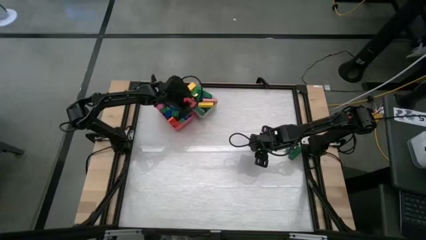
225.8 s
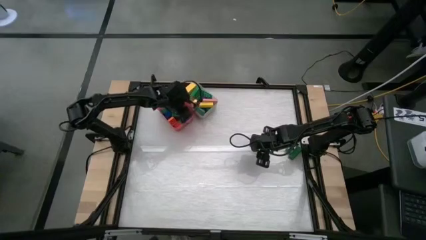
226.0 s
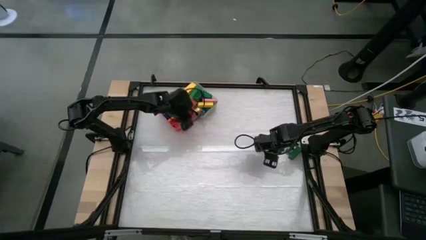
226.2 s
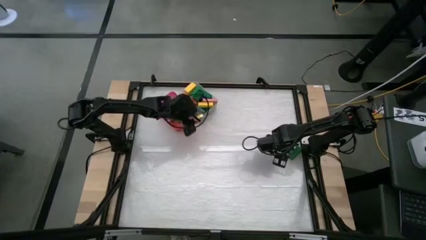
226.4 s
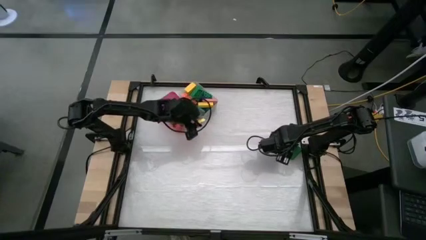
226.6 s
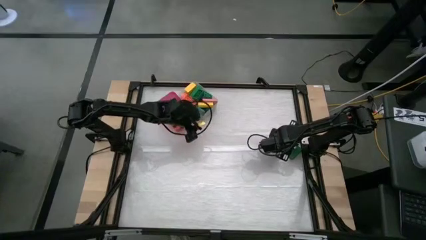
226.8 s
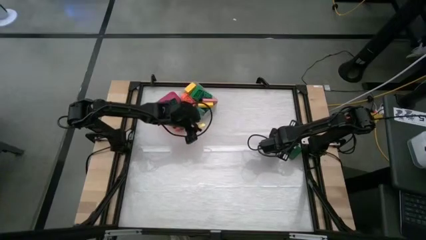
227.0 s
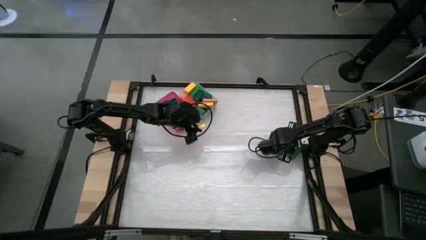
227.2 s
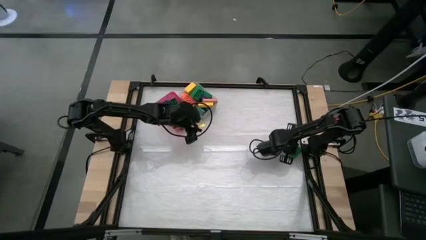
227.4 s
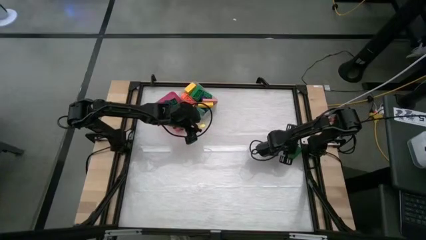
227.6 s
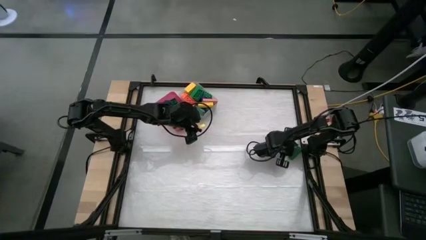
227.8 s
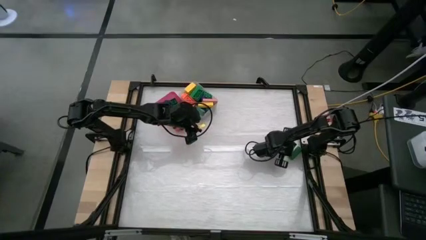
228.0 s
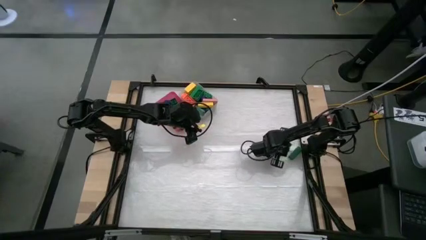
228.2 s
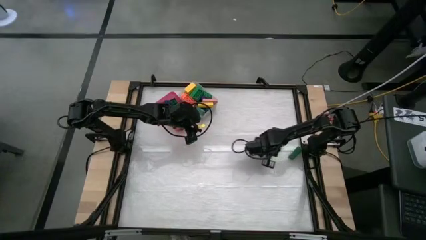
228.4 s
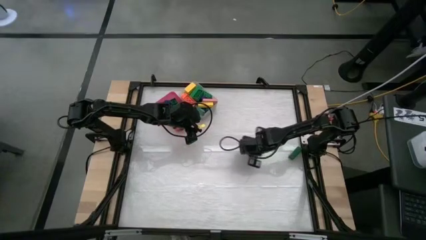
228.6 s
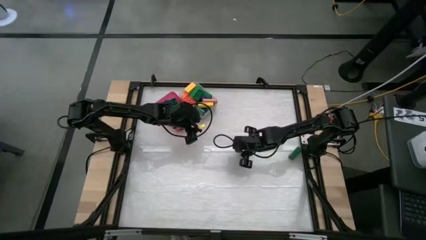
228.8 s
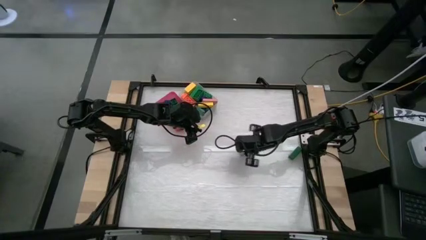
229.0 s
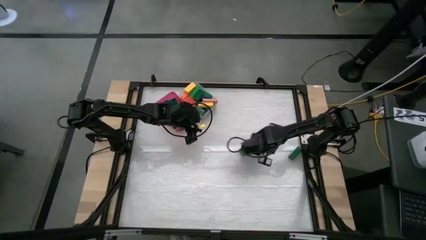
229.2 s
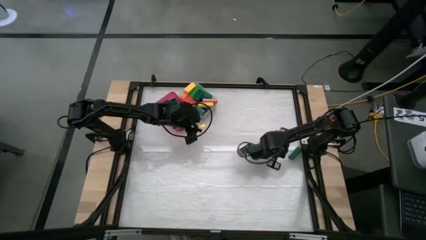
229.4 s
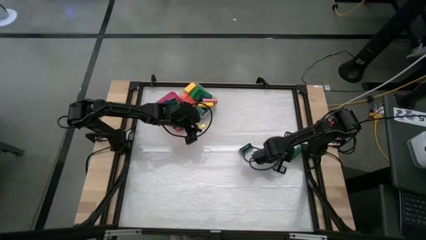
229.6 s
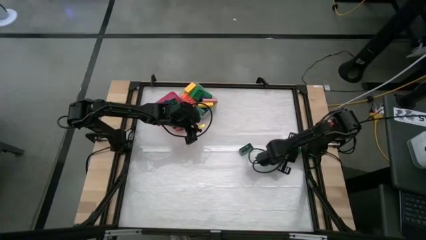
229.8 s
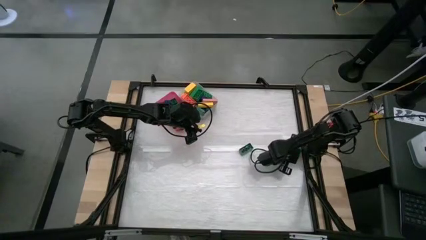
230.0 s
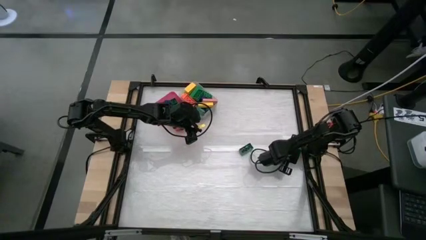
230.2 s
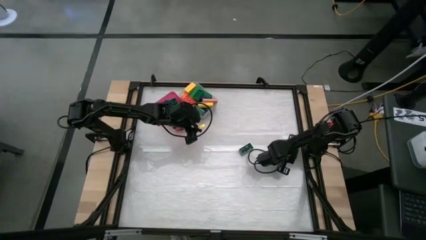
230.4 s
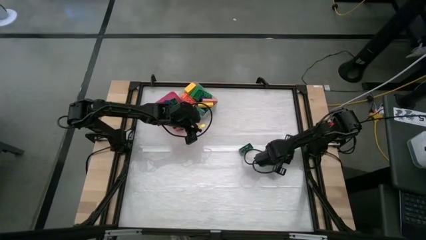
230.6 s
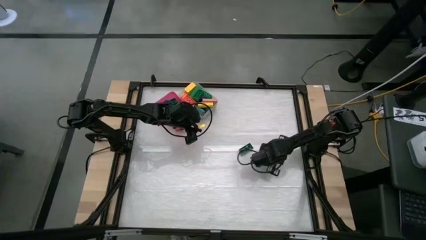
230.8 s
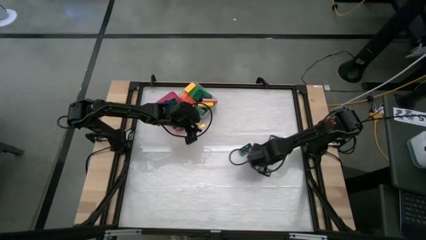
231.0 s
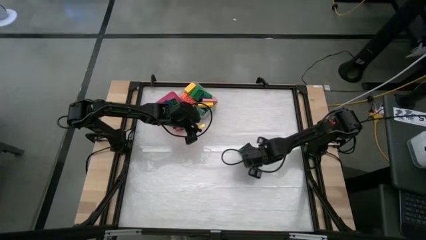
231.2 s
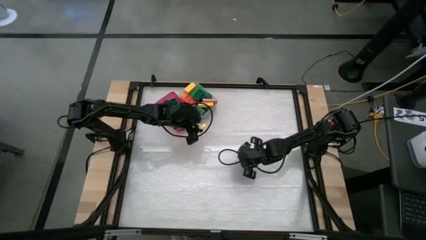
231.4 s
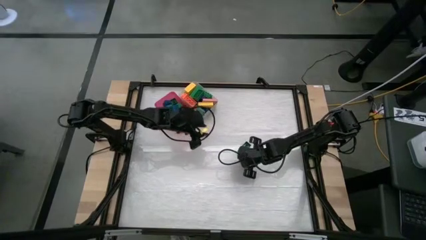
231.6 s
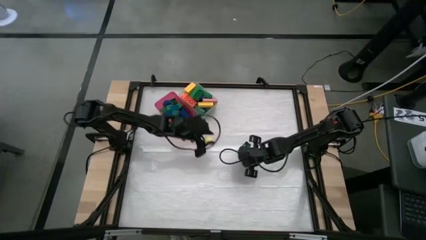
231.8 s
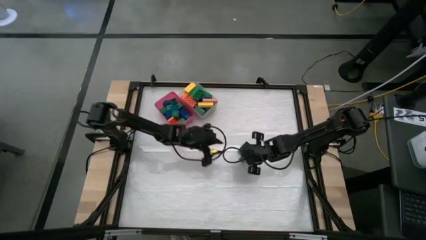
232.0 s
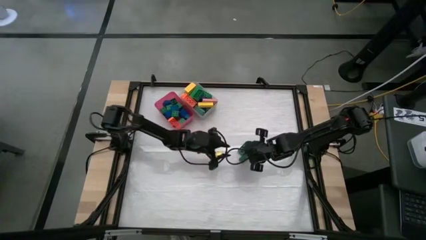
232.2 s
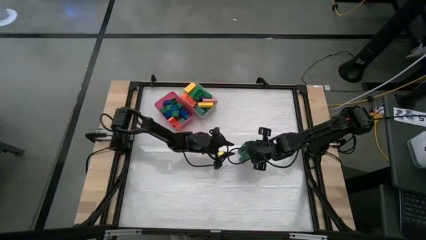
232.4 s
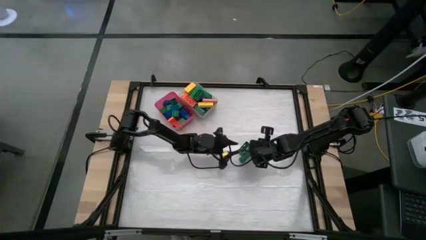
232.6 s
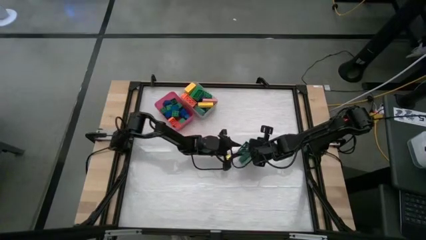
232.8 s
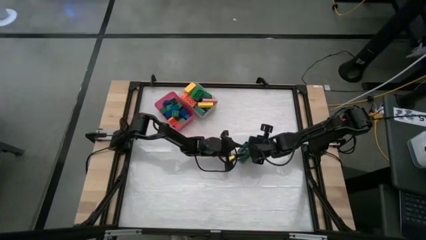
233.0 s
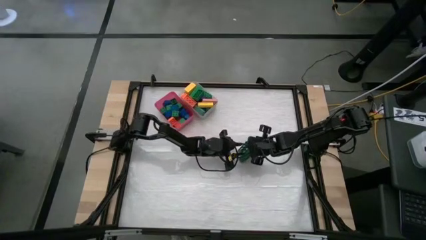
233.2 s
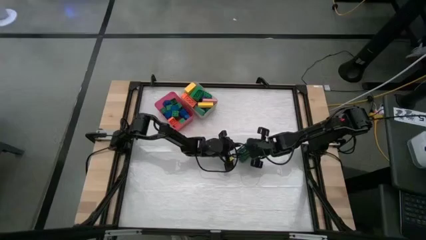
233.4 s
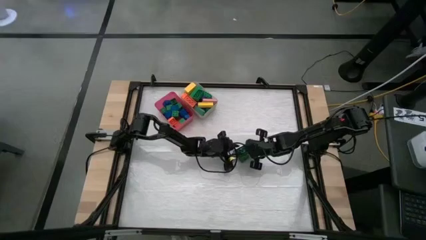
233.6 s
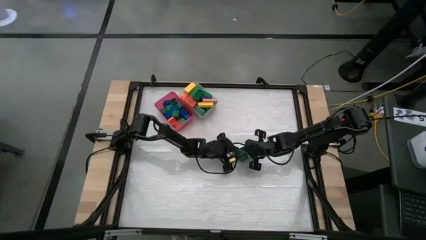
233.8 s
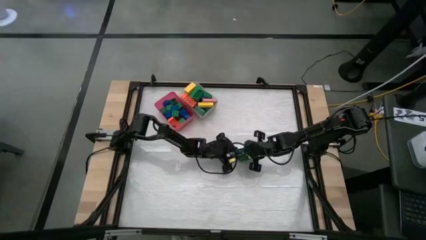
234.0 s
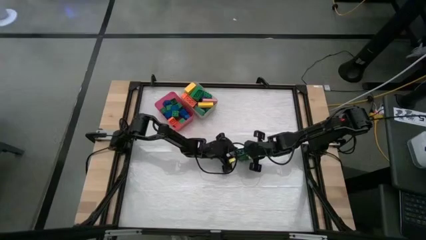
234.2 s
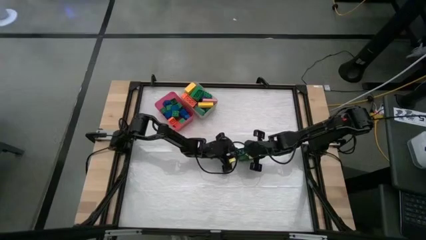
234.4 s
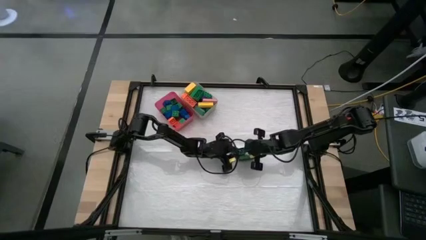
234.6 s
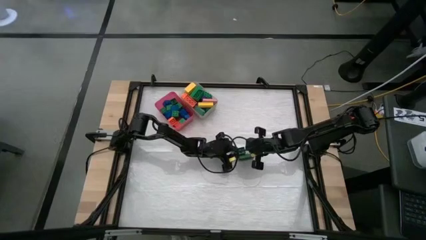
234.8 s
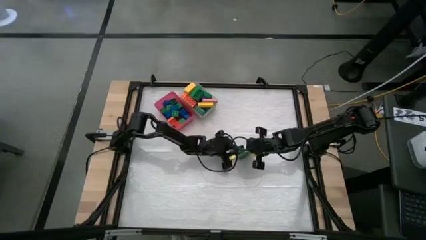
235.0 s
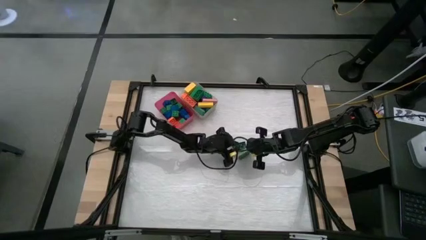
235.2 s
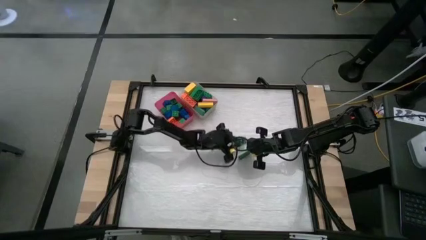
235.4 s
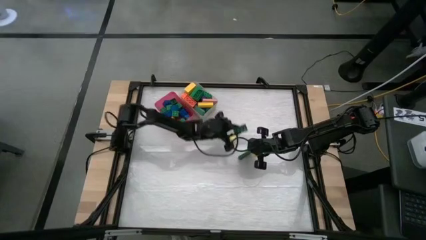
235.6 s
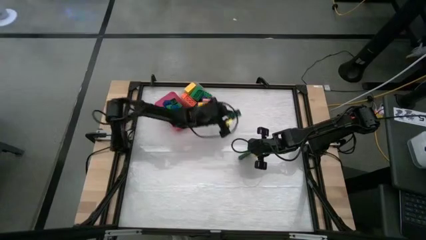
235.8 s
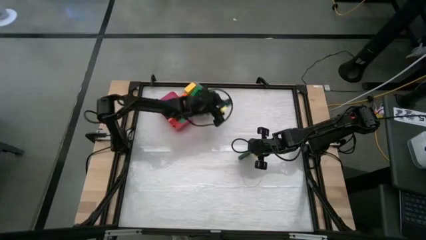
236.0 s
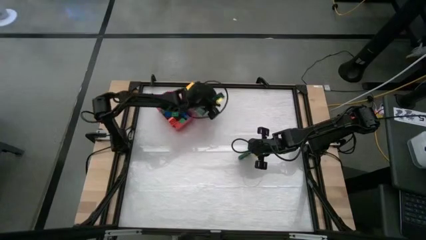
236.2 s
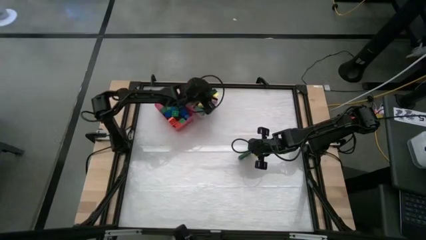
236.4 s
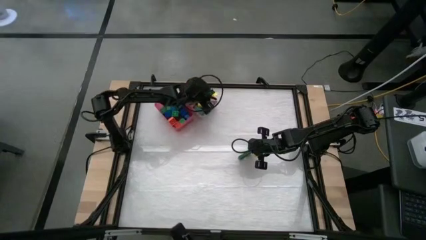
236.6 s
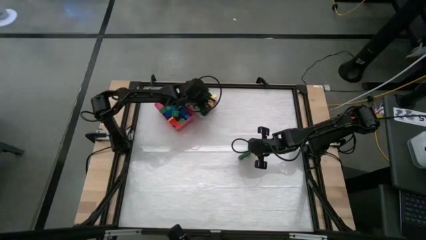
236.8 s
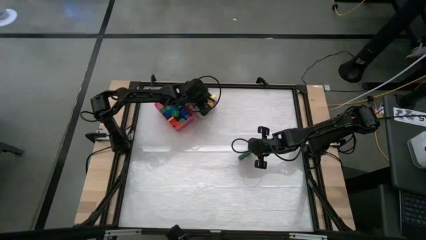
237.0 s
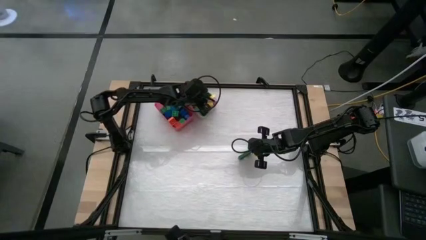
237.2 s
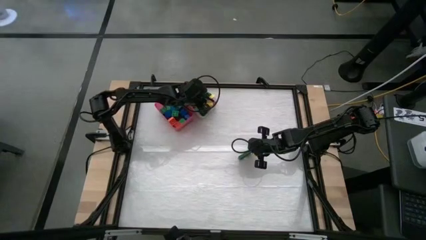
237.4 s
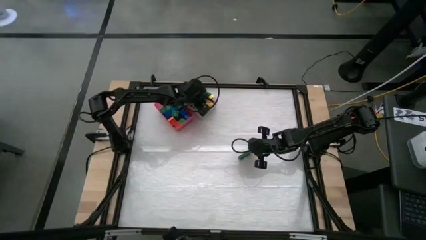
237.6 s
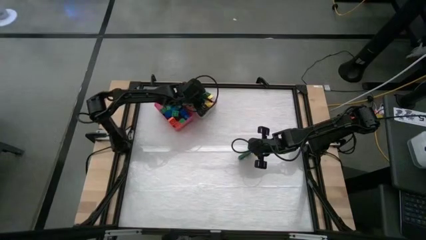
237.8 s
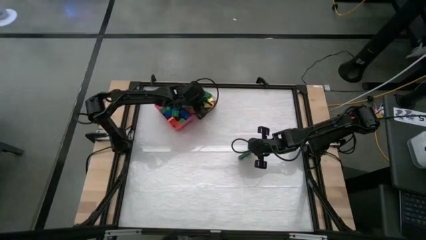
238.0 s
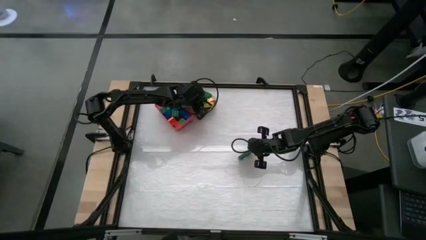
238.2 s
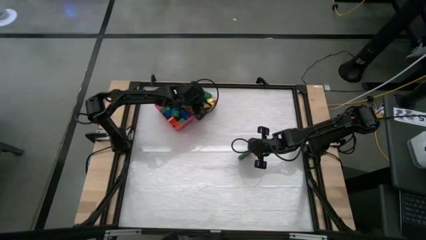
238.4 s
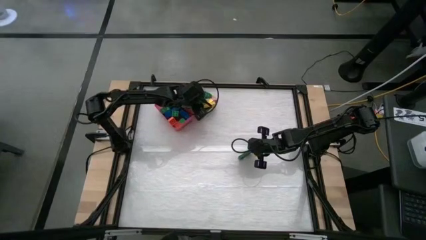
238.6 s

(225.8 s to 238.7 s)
Task: Sort blocks by size
Put the big green game piece into the white bin

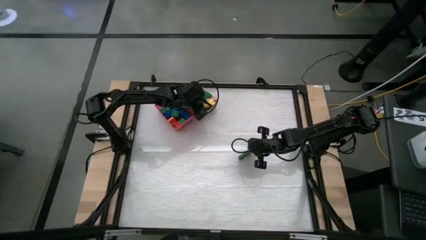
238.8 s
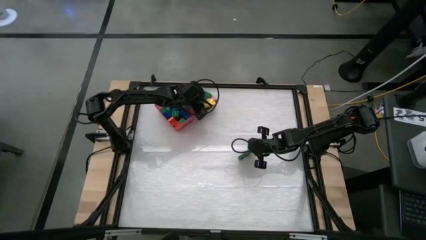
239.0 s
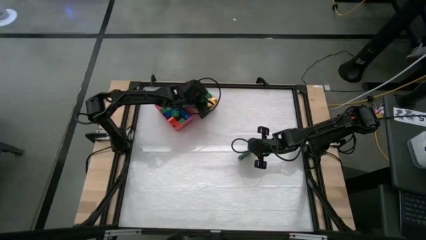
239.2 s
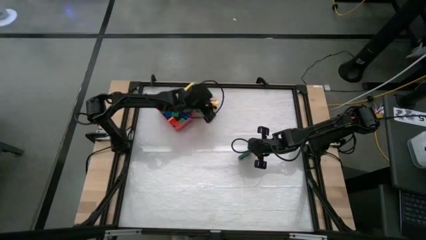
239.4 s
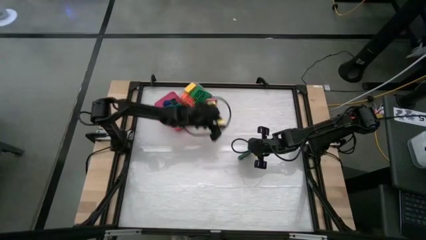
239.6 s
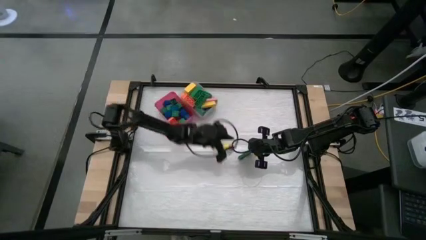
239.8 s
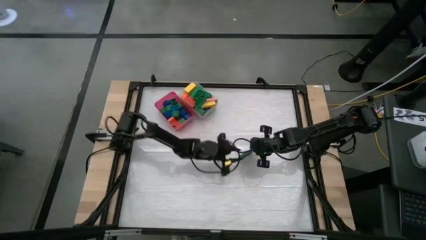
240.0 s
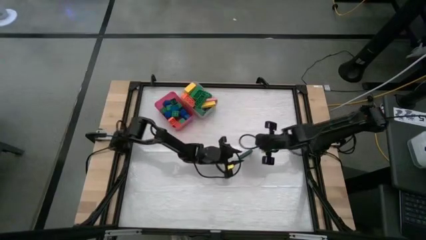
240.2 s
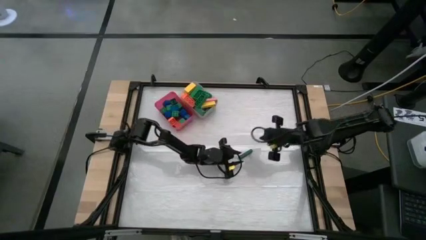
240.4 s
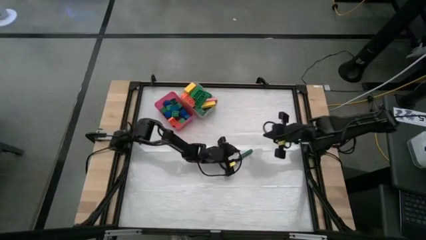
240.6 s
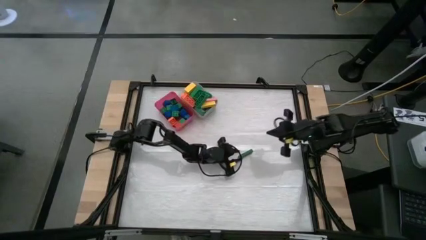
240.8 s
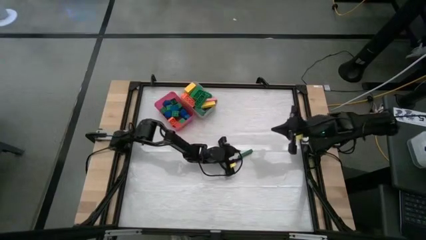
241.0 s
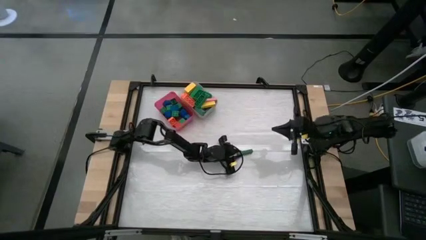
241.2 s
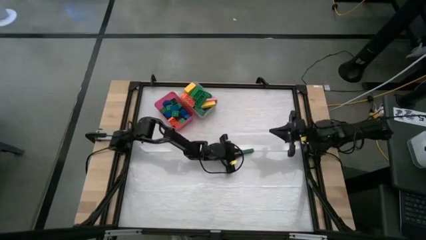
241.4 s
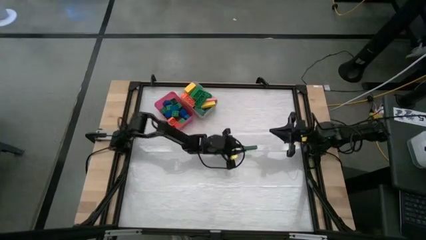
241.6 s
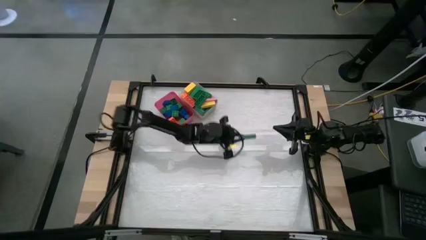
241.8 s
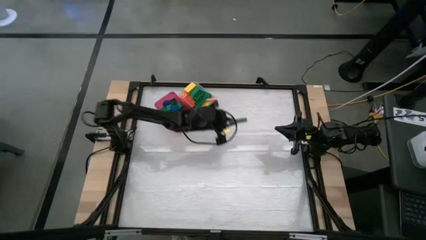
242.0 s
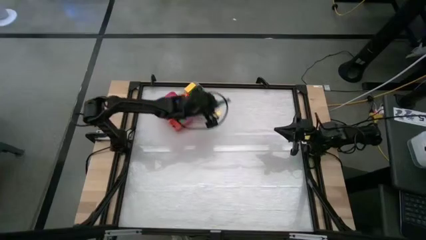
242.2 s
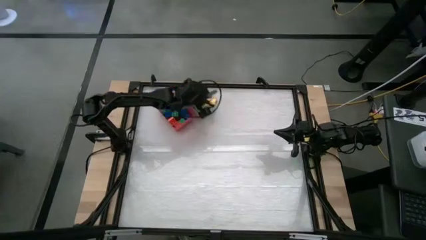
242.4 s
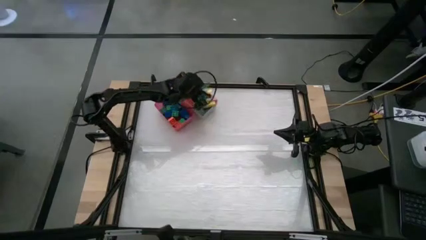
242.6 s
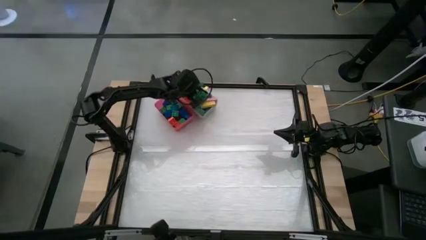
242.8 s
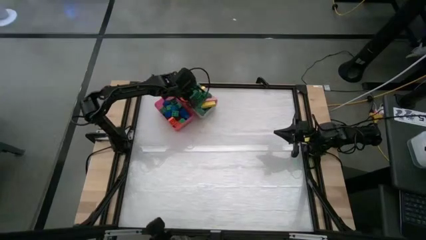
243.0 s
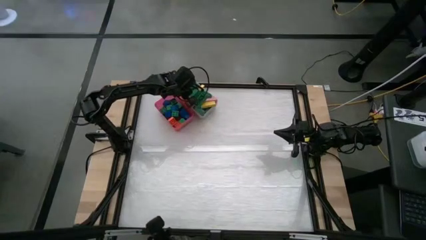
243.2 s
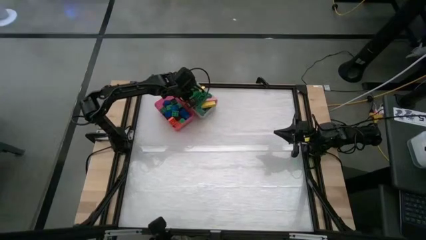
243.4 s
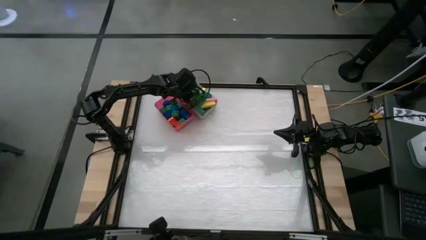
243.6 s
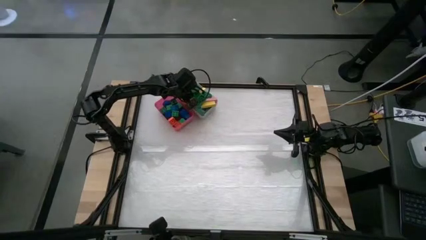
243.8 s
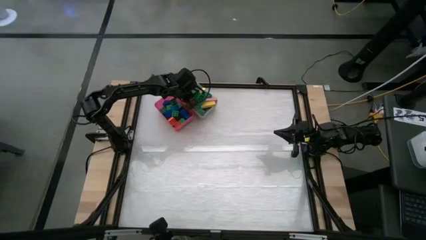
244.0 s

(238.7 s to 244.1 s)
Put the big green block into the white bin
